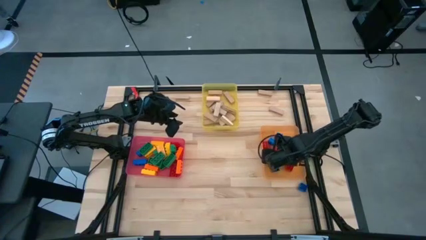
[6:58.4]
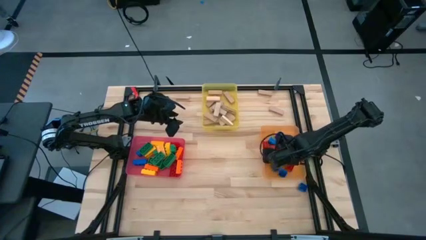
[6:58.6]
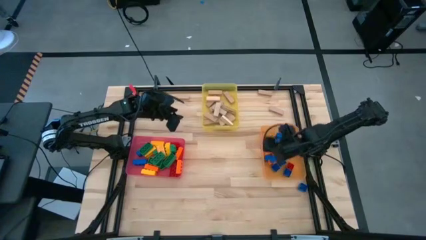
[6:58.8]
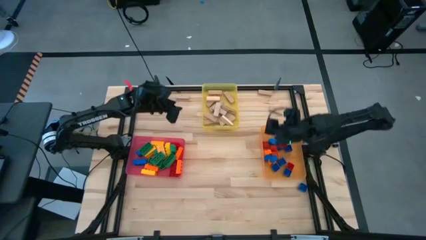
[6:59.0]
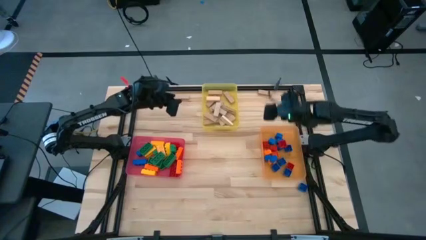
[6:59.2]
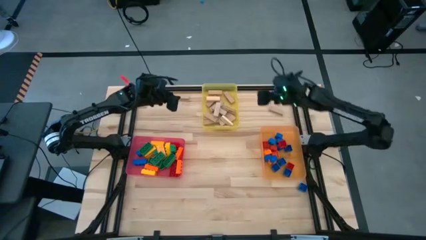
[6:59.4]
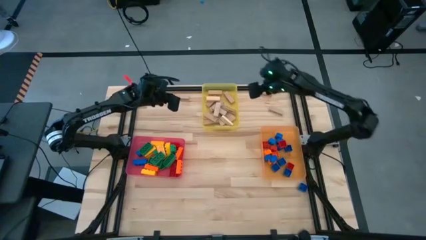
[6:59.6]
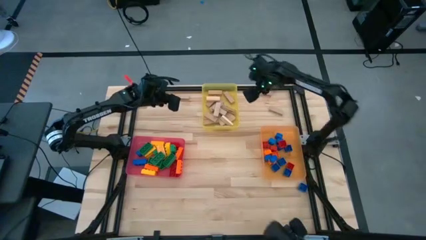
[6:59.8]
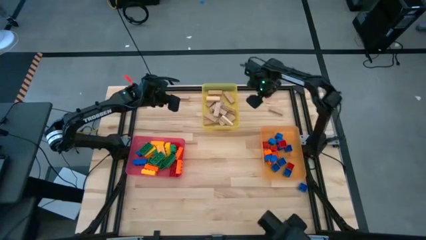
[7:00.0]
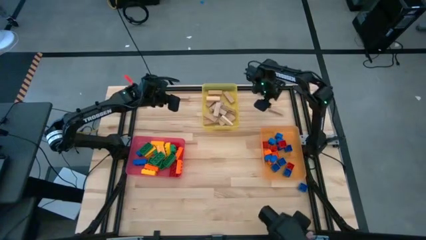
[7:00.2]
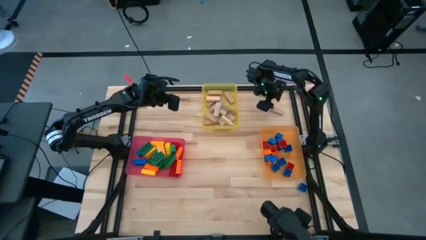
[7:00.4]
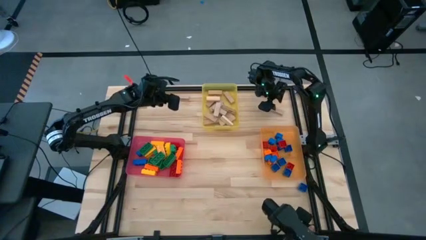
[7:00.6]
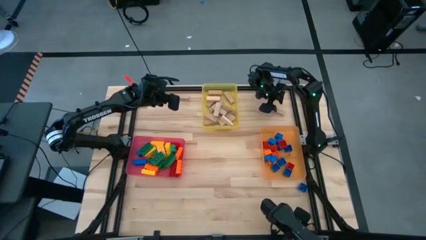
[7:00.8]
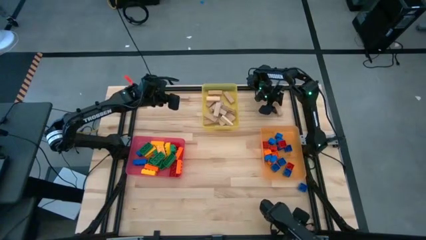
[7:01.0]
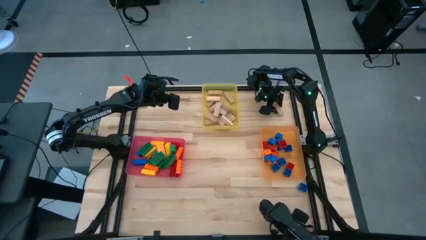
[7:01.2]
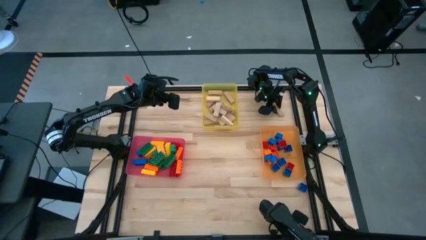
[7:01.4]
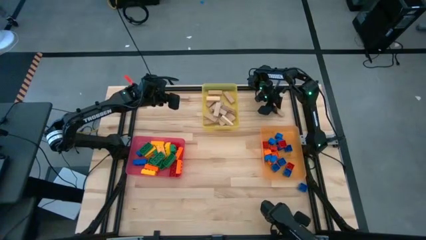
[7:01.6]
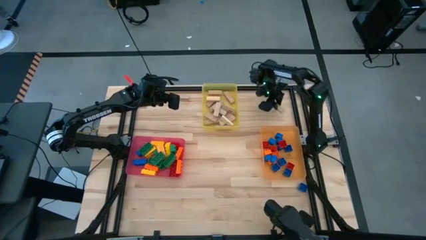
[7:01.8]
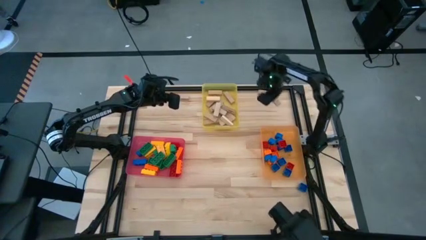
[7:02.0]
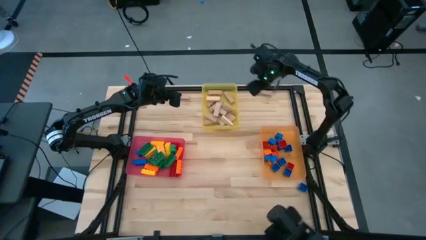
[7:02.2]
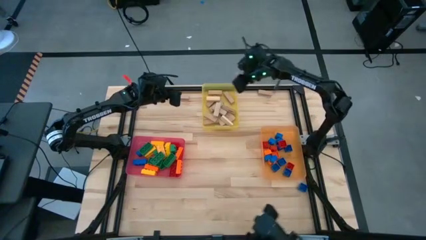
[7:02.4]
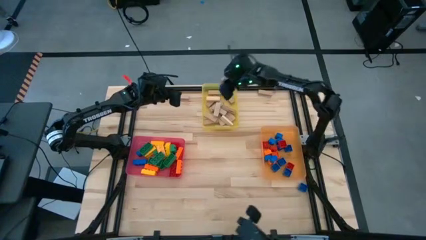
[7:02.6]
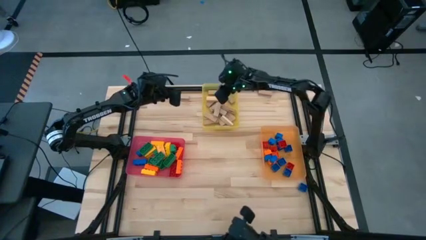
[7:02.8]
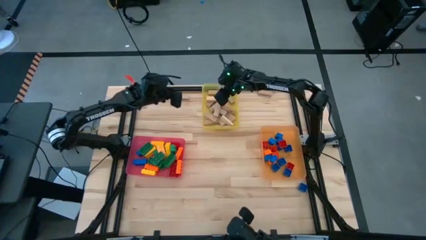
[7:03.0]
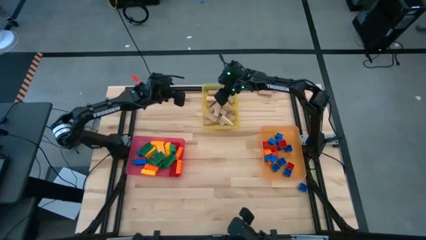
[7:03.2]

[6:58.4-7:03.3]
Task: Sort blocks by size
Put the wooden block into the yellow bin

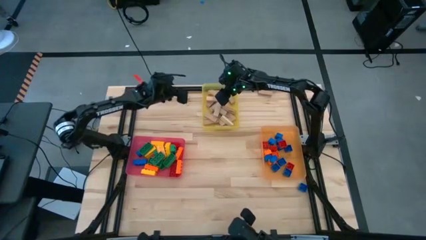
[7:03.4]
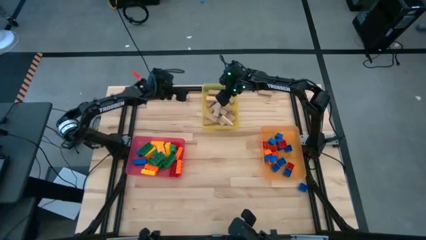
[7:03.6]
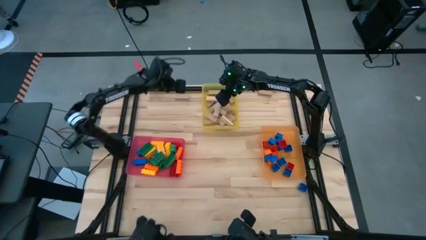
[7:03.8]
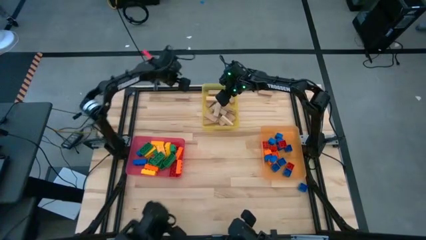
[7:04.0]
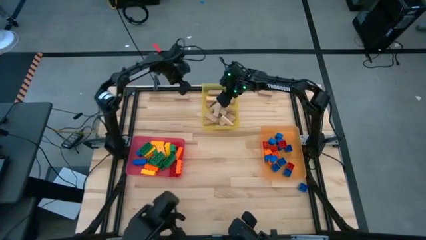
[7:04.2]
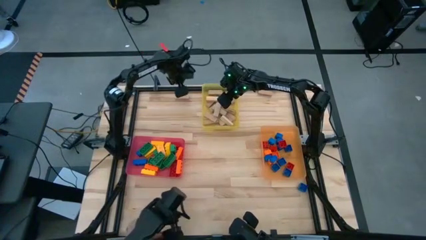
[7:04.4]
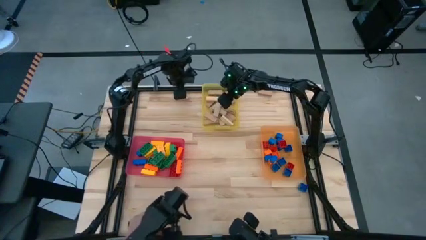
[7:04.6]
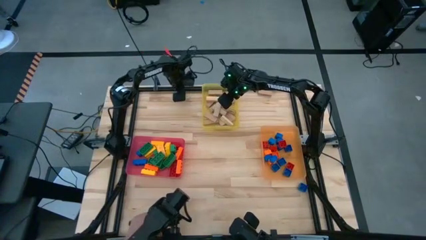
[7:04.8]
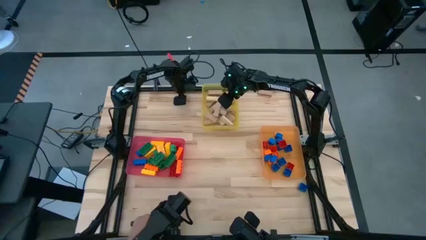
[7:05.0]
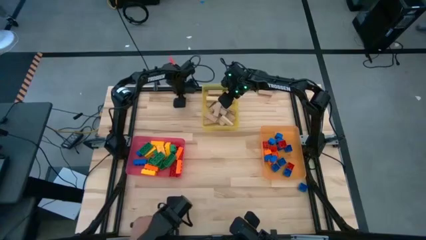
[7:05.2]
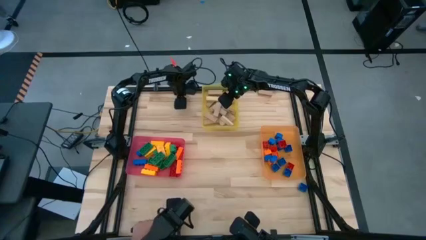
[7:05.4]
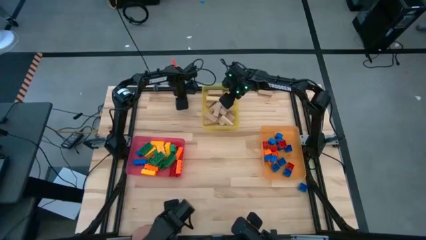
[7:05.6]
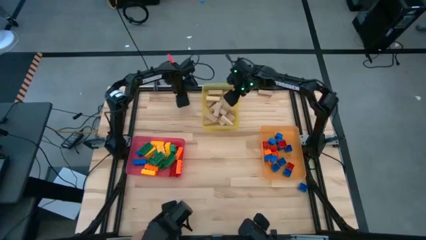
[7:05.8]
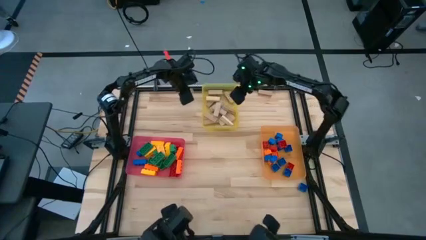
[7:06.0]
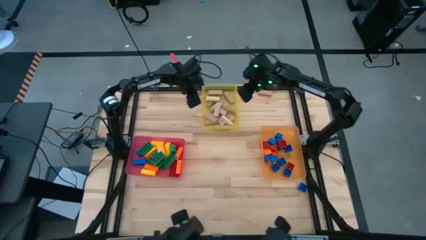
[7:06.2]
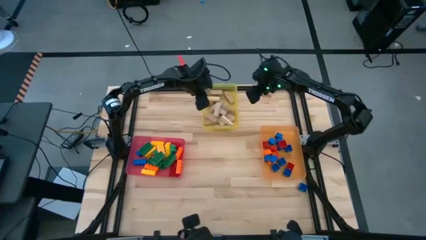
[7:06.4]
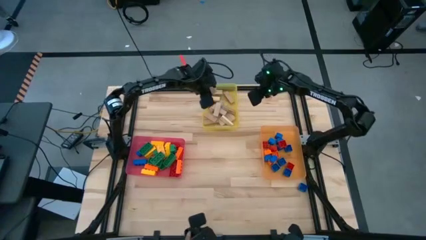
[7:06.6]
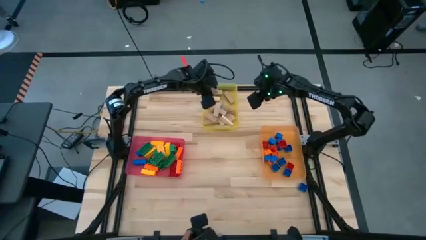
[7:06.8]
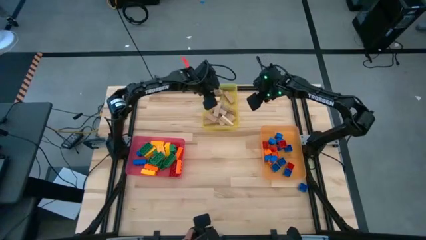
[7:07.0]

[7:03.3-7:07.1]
Put the wooden block into the yellow bin

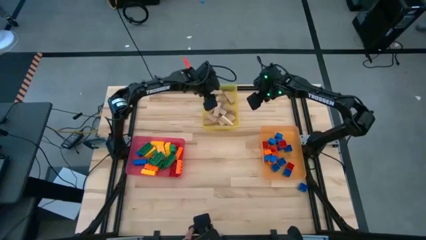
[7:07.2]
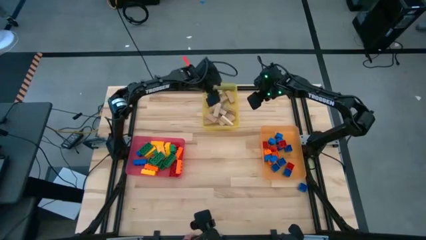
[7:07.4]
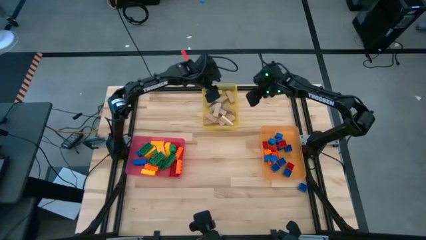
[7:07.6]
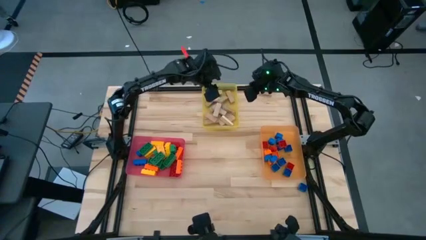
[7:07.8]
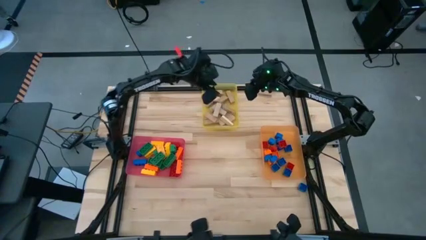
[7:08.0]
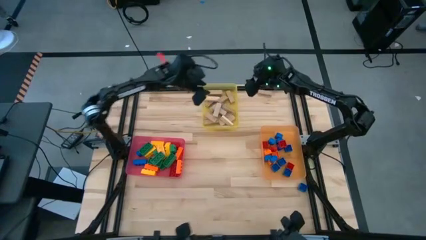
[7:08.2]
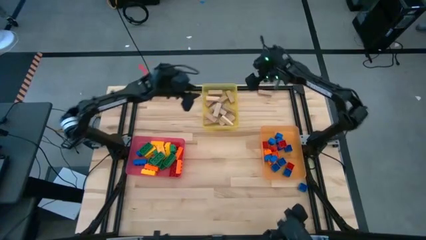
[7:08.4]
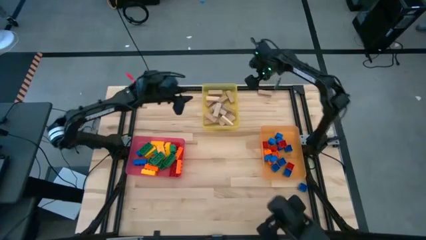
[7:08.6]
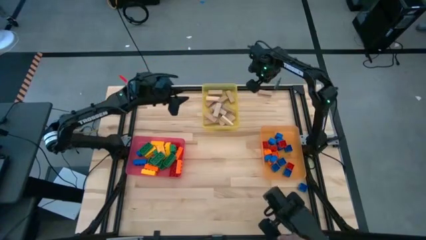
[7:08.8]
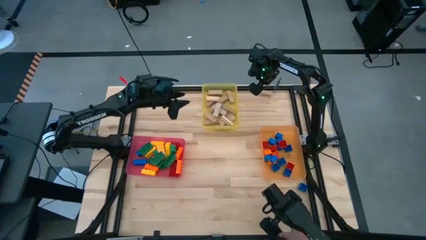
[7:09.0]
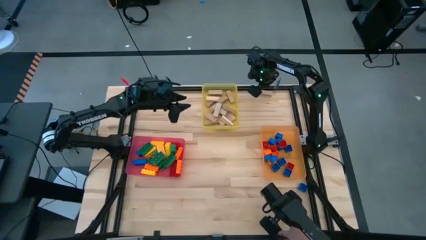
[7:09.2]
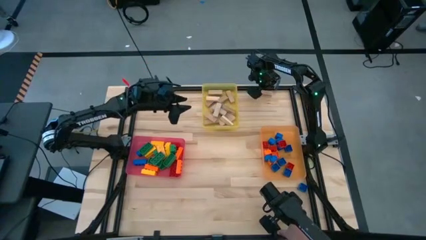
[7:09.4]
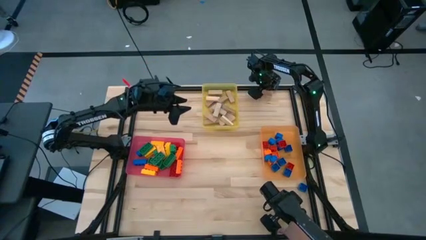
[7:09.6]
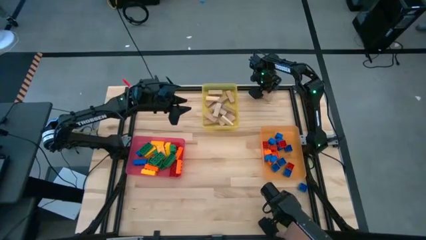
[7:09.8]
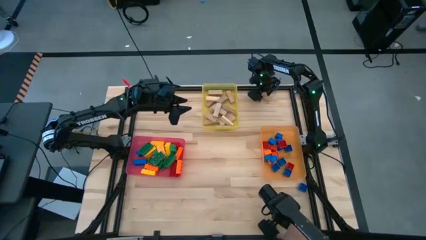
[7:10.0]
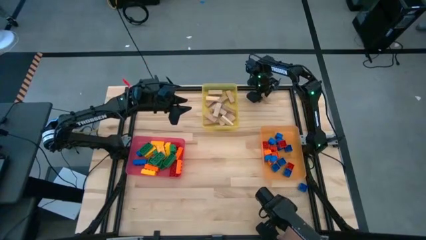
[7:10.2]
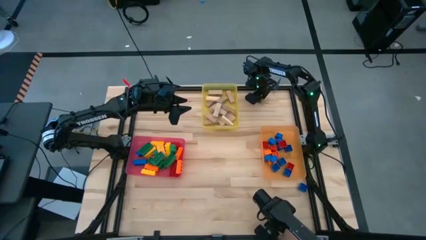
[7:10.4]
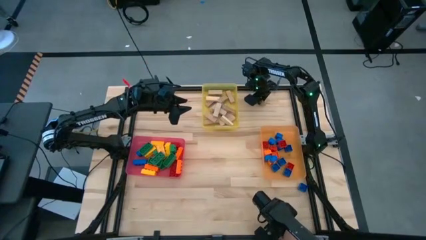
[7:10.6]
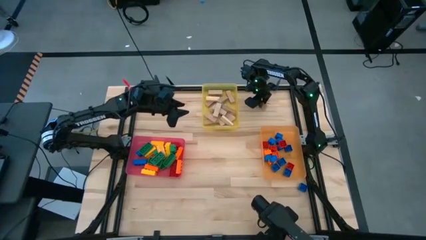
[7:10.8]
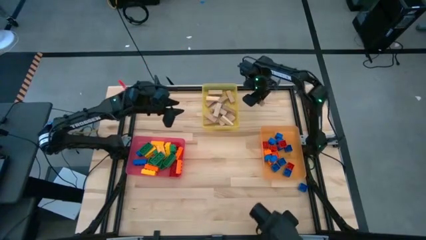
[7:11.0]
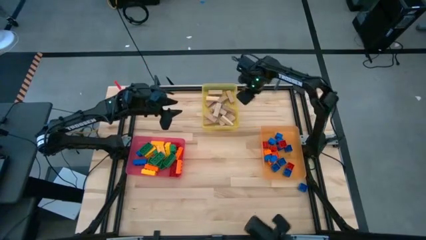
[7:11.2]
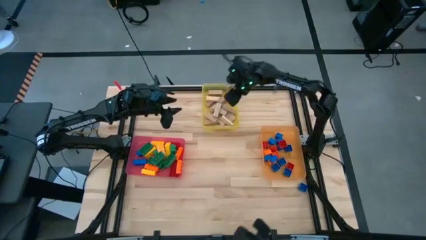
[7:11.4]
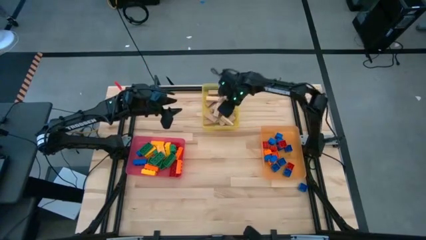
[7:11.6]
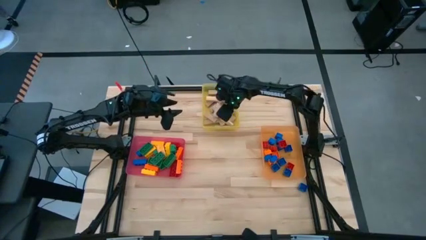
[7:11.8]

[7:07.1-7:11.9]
Put the wooden block into the yellow bin
